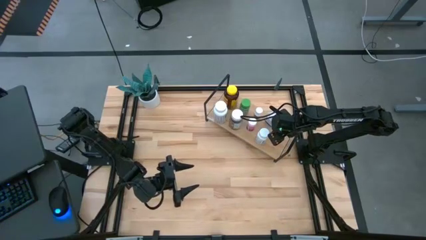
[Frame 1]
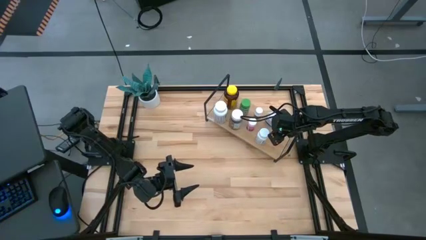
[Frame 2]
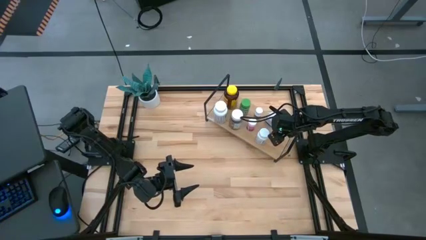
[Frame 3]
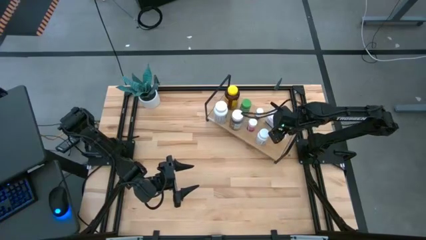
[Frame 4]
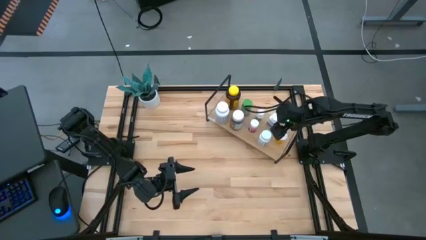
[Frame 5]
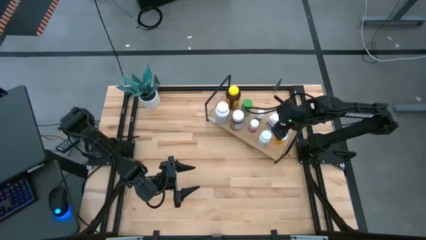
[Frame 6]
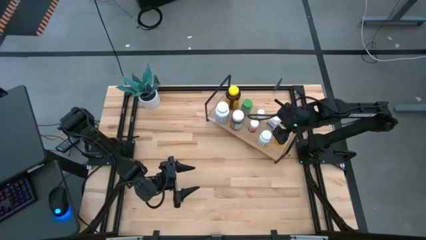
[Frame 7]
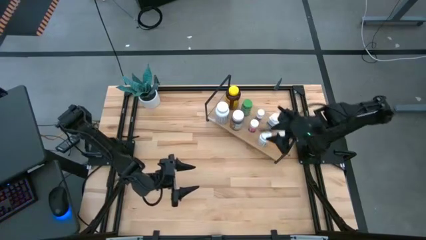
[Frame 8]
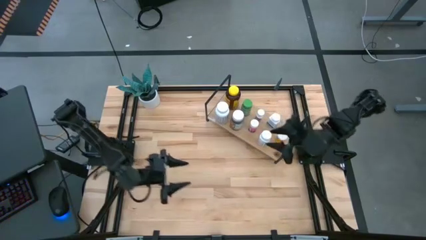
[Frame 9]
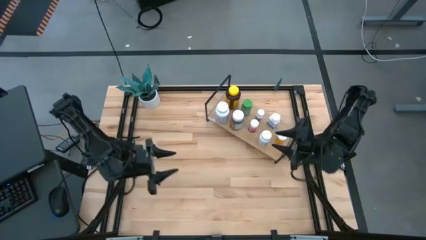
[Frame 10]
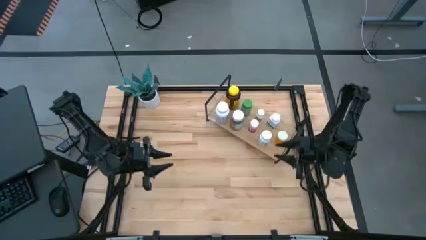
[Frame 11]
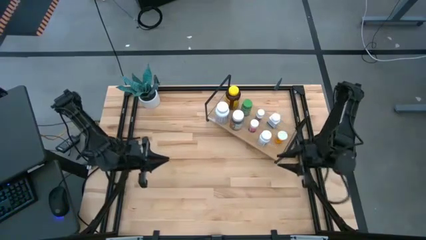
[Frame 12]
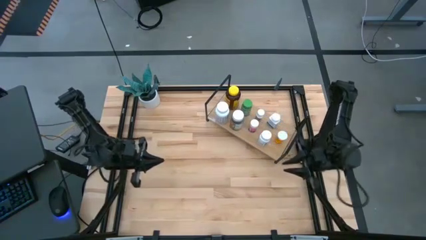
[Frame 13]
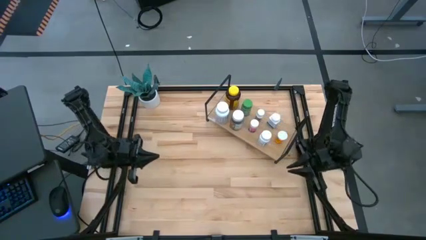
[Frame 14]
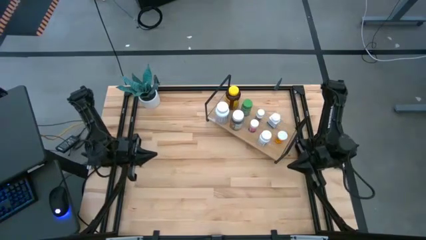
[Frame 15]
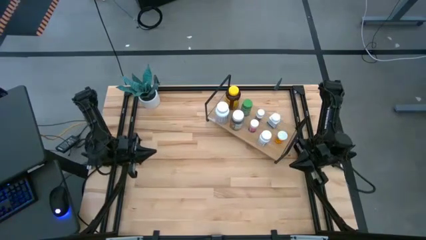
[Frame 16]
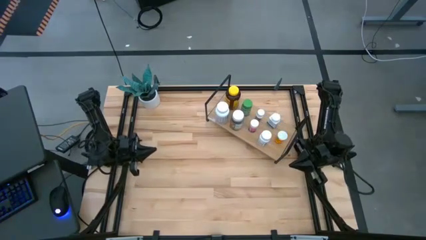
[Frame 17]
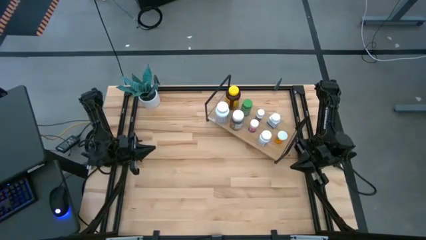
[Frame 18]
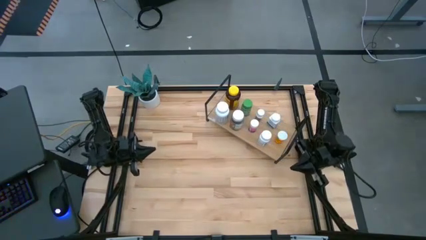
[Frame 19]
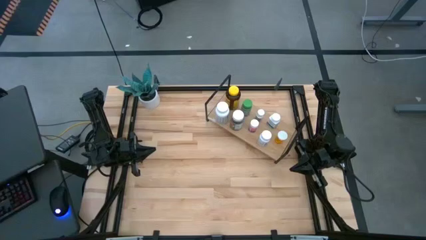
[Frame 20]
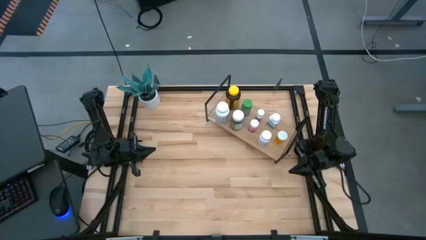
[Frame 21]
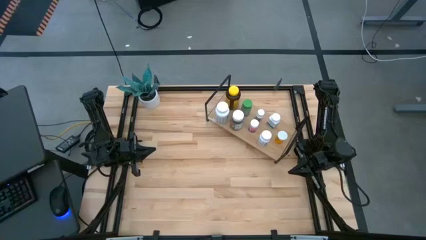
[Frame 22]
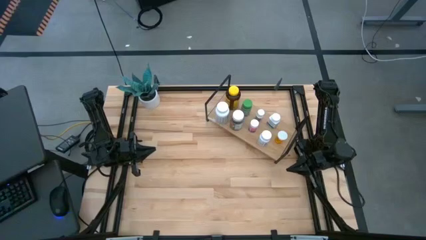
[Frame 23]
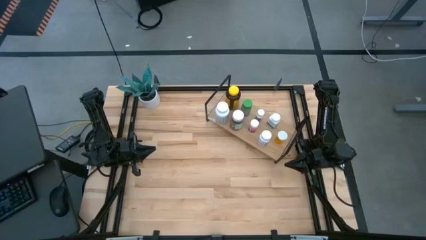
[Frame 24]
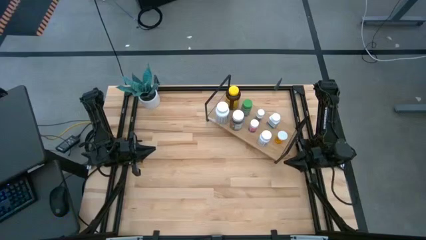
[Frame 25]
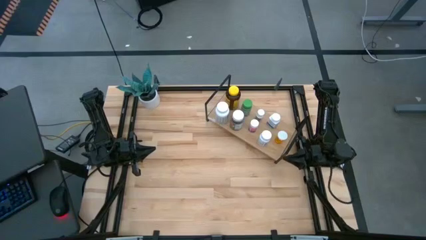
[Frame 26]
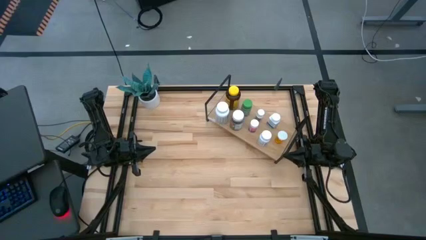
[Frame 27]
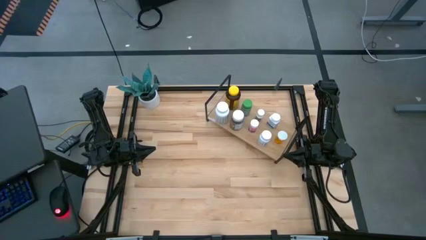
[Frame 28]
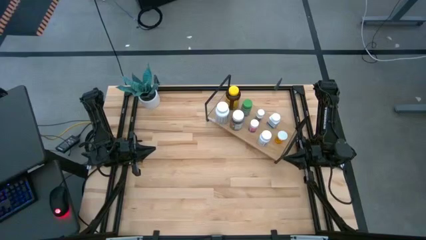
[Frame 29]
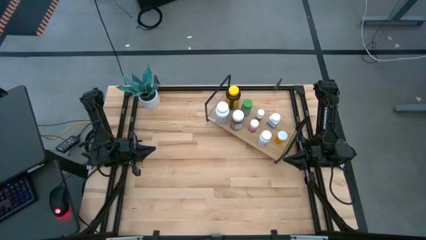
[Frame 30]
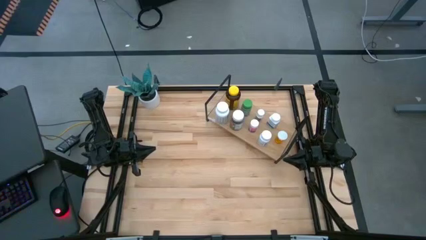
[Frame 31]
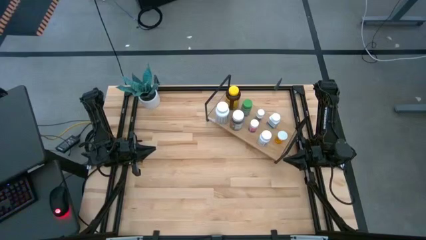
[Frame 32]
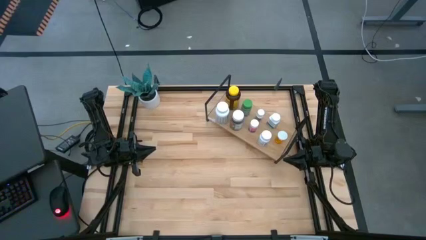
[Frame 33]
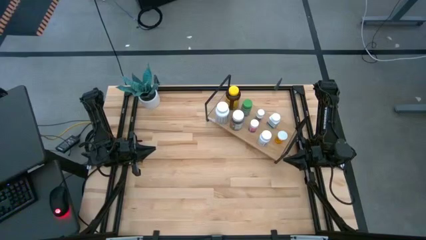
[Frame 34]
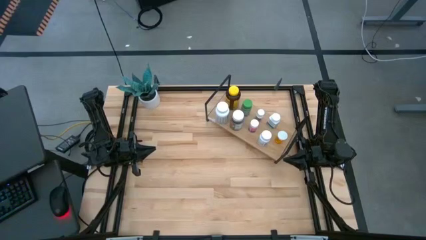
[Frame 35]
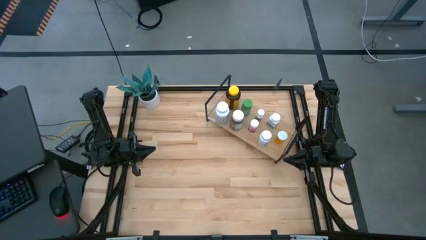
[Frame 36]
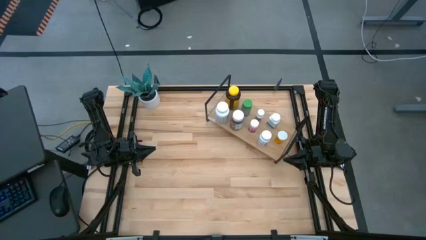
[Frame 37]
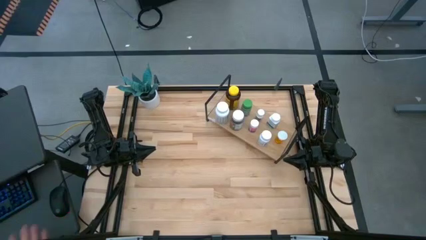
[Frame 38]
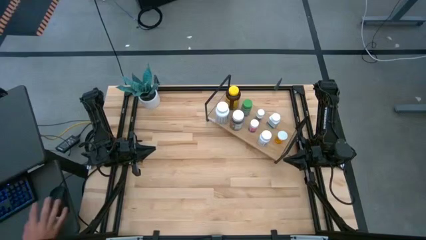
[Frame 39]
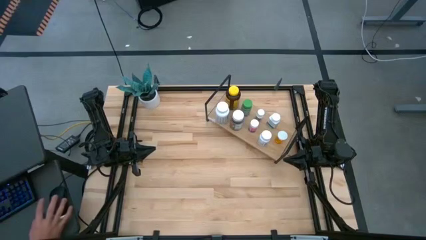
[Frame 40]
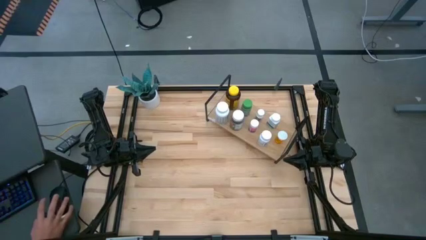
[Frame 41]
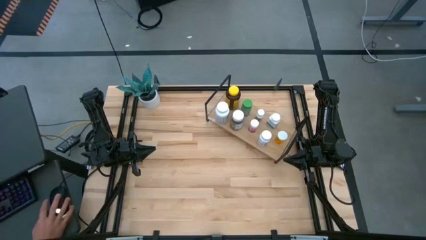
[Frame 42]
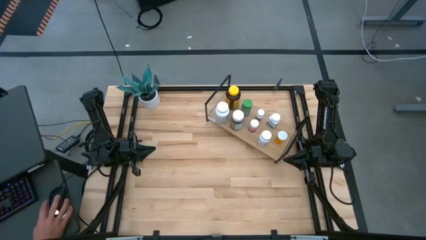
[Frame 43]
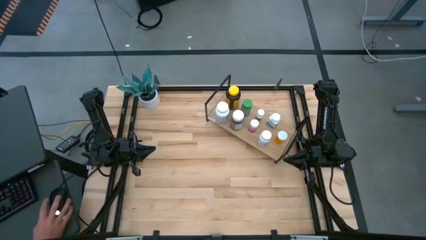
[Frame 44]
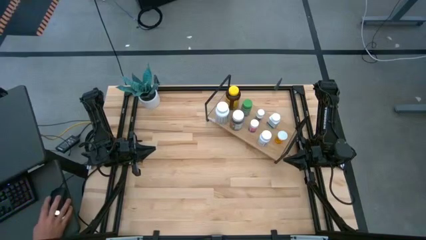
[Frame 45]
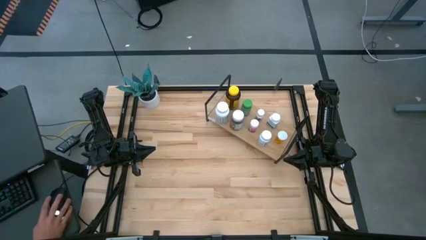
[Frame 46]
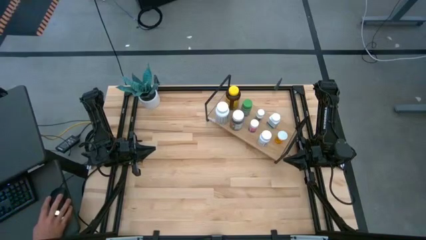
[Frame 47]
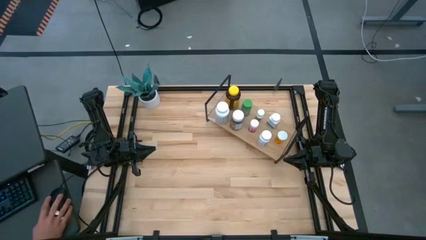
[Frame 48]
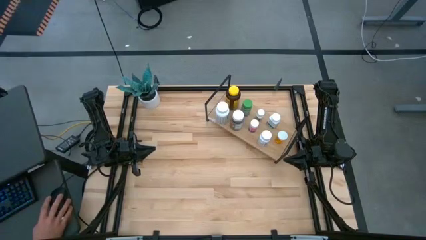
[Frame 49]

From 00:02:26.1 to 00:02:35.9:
Task: Pick and place medicine bottles onto shelf by color
Return to Home Position

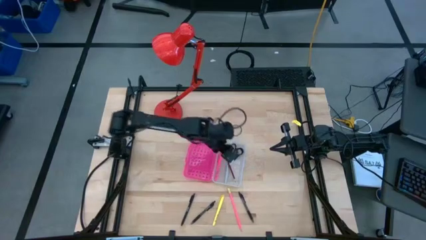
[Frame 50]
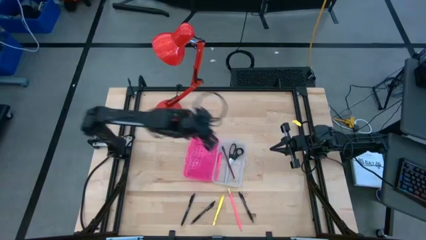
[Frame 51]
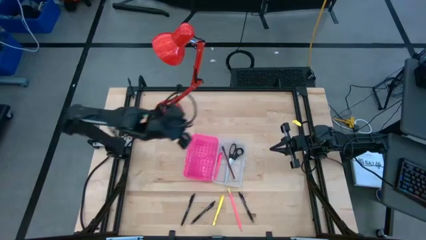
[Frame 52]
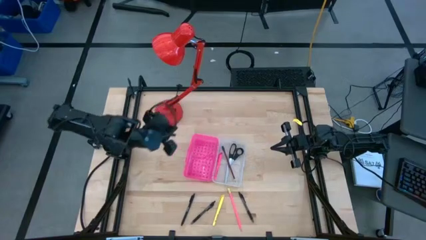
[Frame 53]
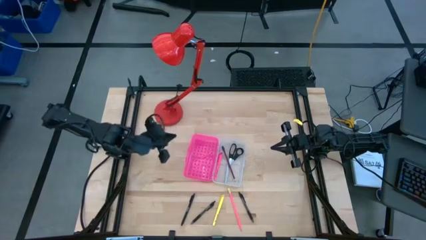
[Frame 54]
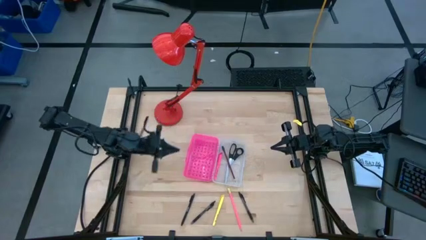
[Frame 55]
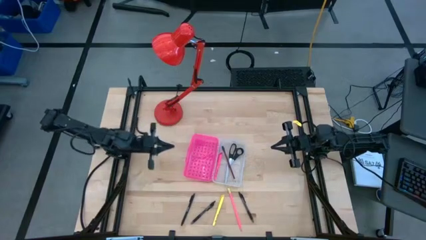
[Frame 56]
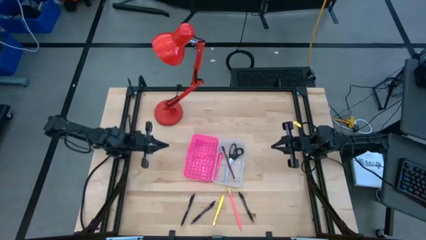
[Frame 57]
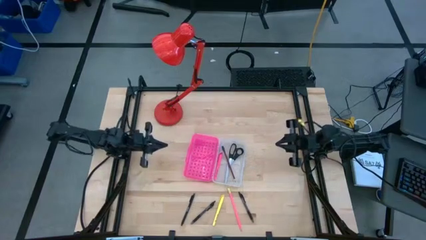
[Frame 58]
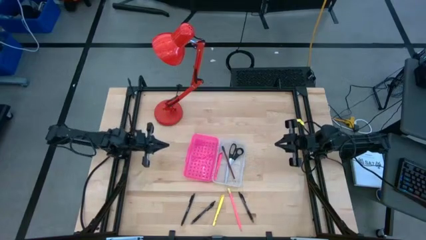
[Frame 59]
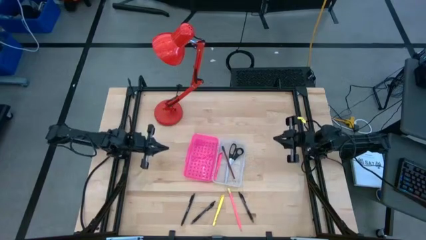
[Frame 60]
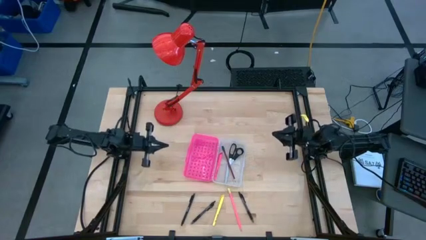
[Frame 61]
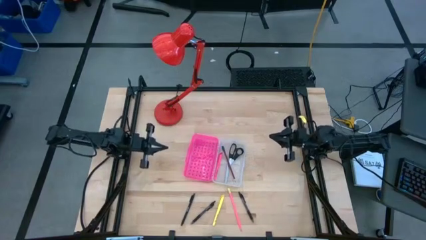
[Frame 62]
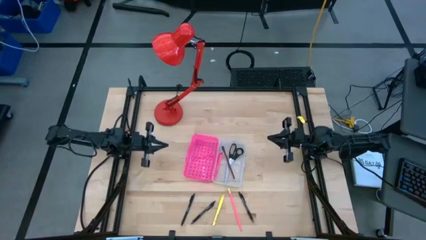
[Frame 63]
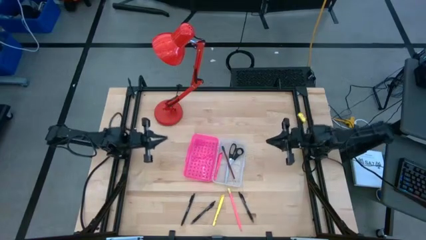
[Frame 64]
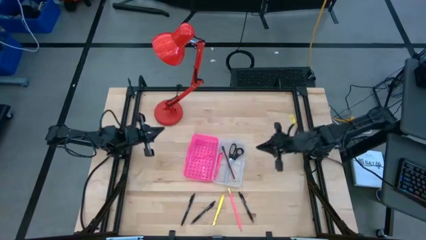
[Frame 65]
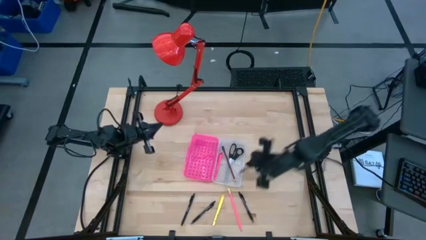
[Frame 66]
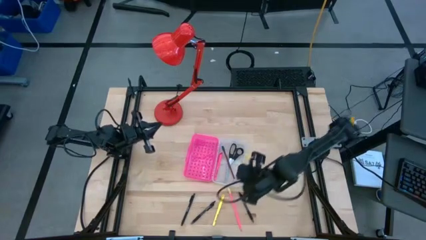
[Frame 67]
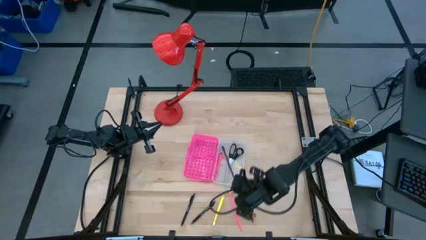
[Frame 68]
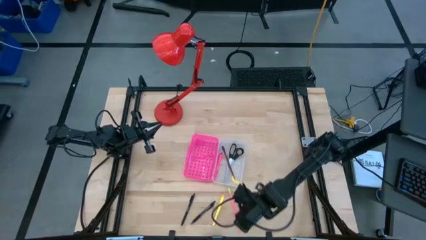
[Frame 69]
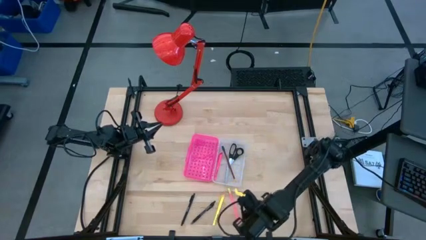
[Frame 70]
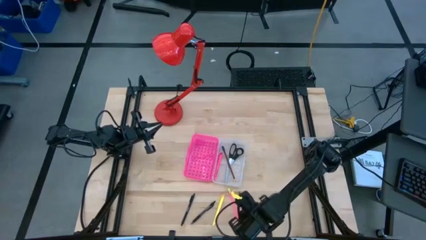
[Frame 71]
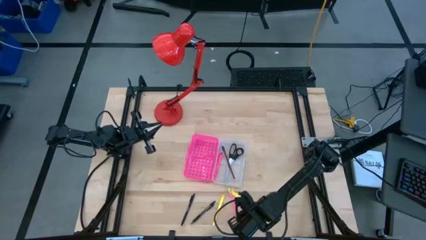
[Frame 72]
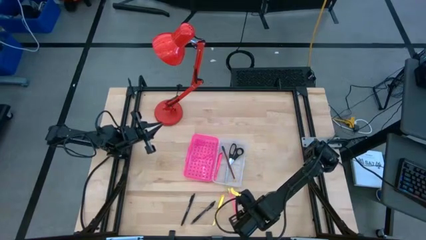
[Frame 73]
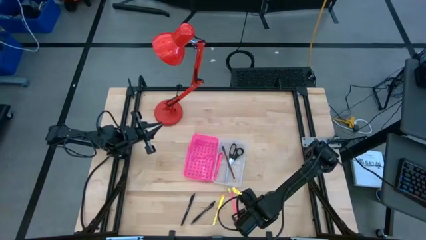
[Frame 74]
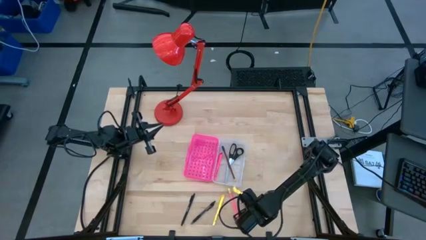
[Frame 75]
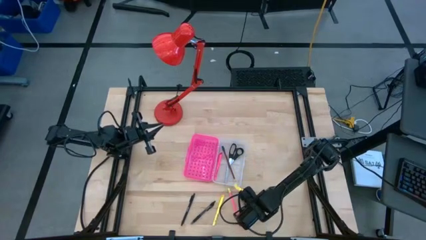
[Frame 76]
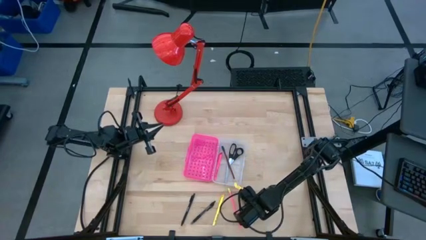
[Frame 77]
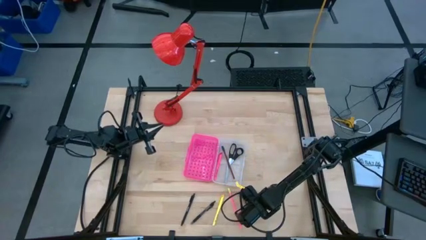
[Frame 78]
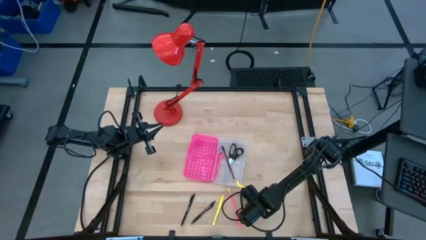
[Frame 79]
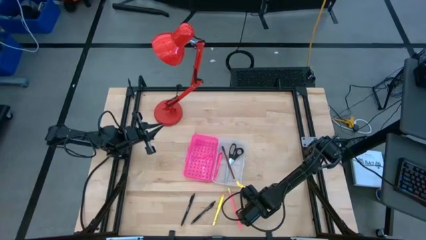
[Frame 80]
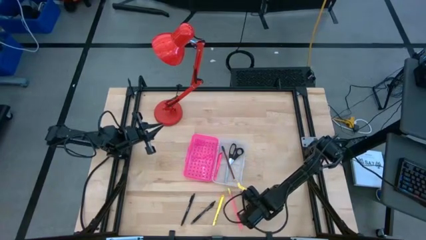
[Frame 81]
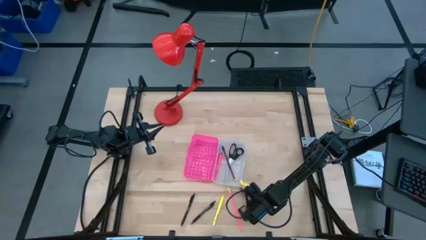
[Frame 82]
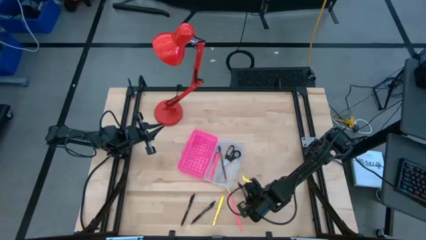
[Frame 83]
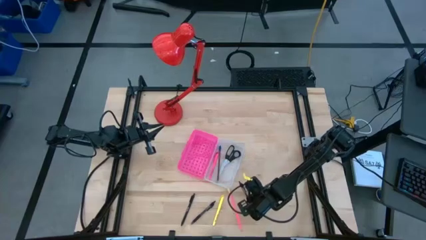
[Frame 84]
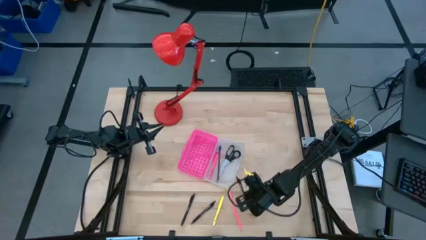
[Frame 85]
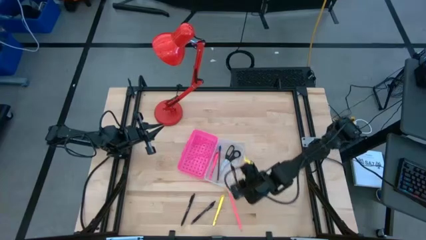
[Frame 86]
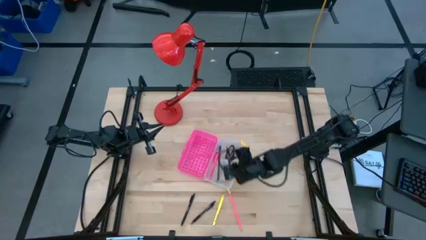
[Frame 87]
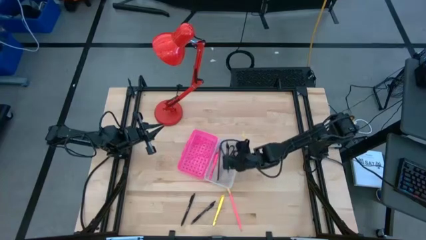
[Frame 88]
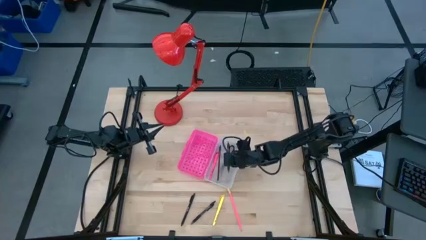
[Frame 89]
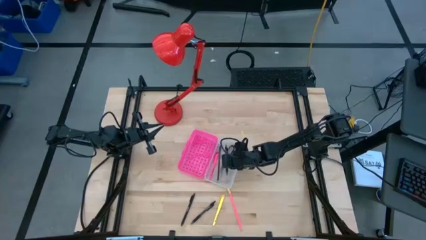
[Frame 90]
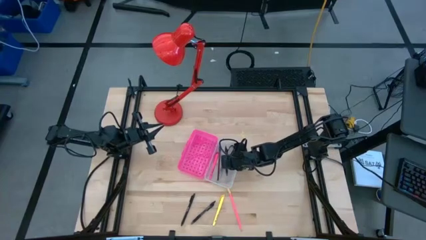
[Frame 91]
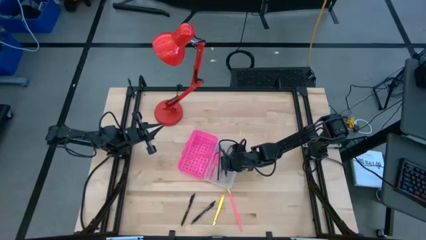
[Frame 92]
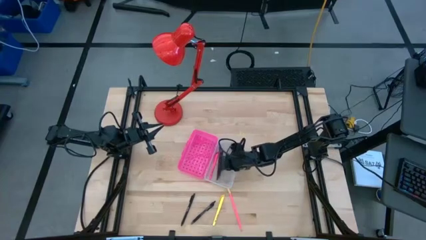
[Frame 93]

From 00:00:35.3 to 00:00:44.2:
Task: Pick & place school supplies into a supply box
Put the right black pen in the pink box
